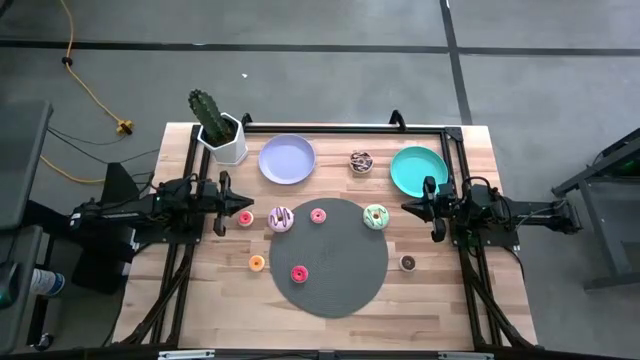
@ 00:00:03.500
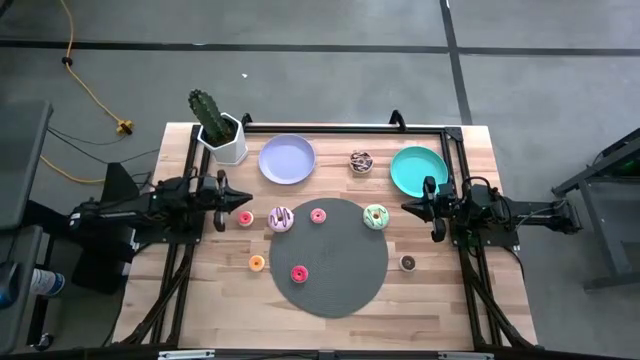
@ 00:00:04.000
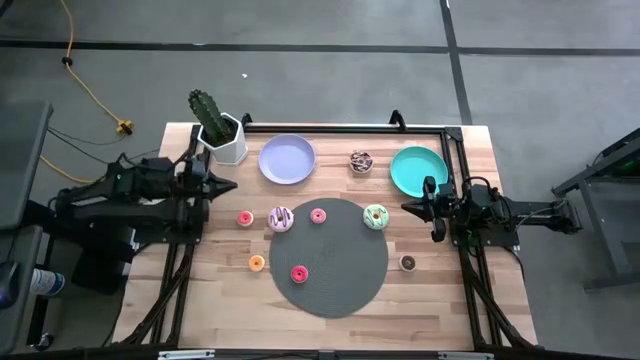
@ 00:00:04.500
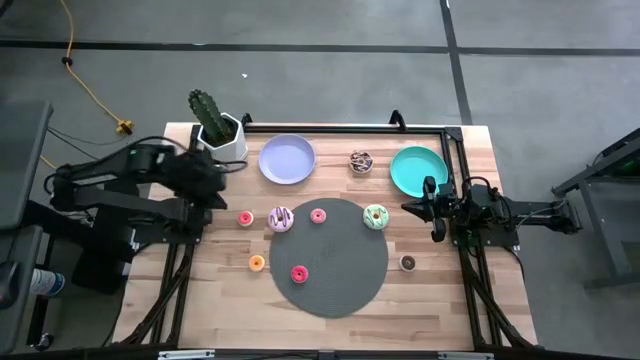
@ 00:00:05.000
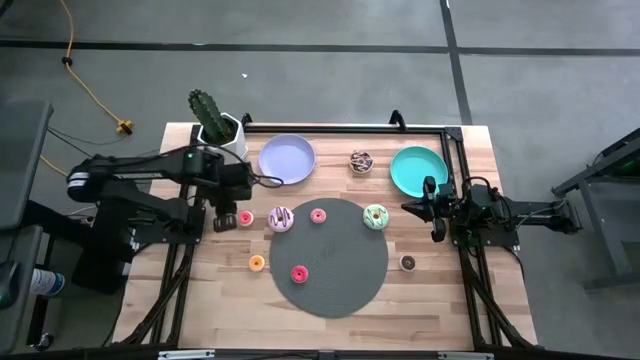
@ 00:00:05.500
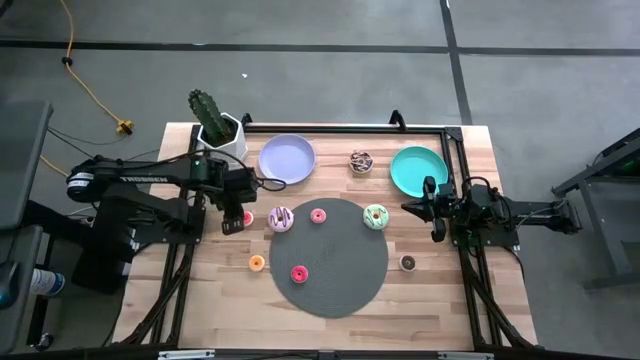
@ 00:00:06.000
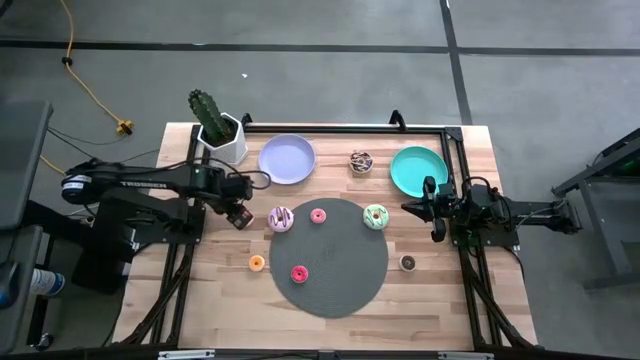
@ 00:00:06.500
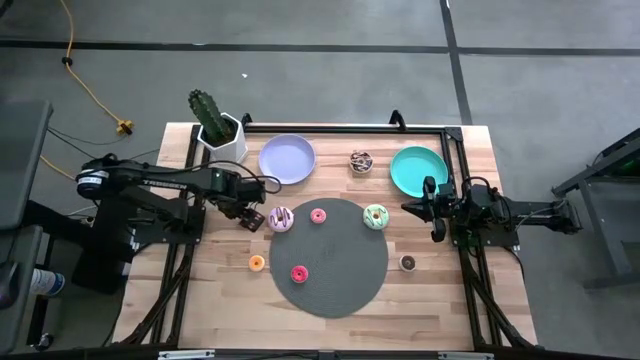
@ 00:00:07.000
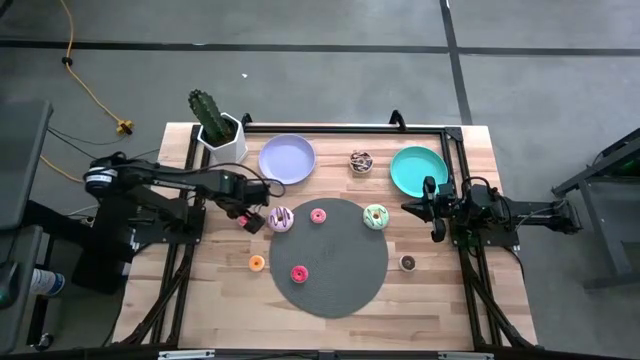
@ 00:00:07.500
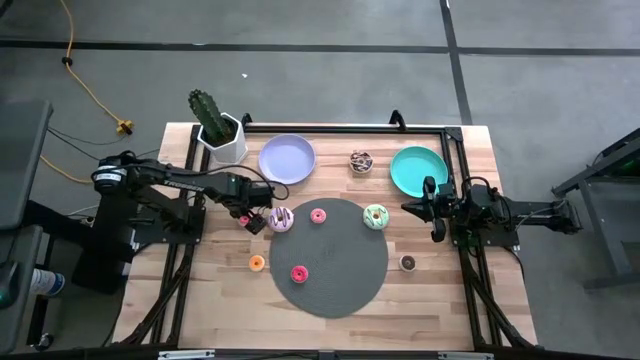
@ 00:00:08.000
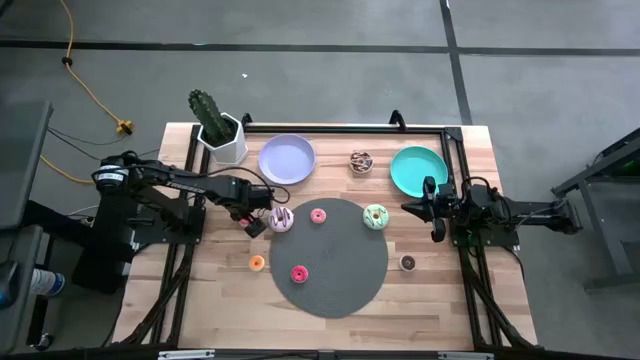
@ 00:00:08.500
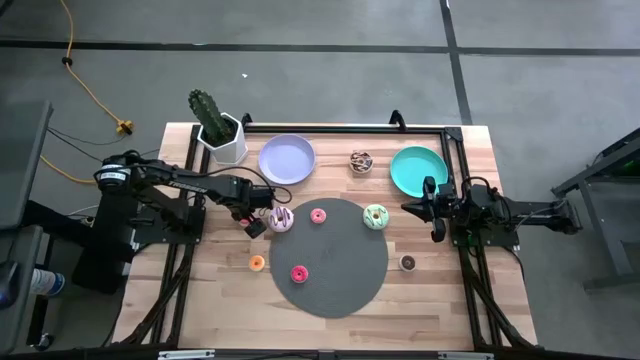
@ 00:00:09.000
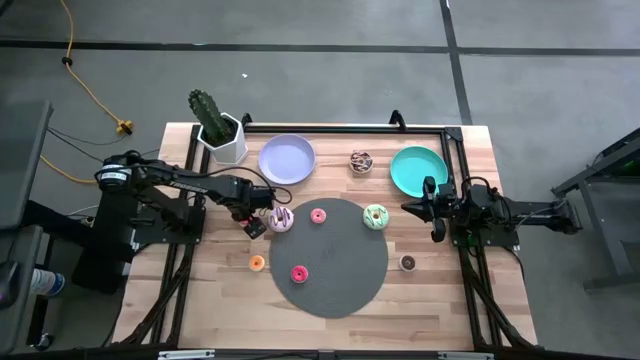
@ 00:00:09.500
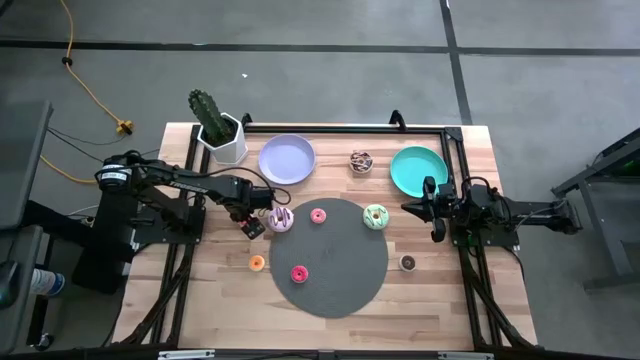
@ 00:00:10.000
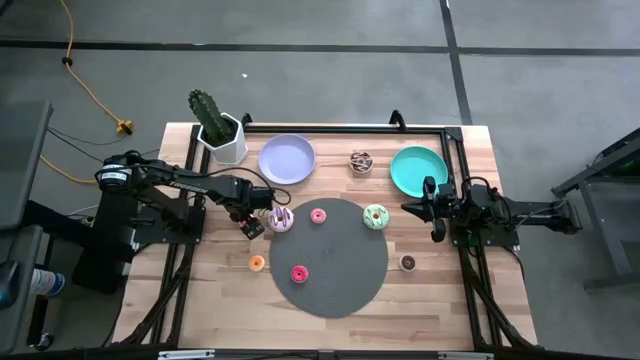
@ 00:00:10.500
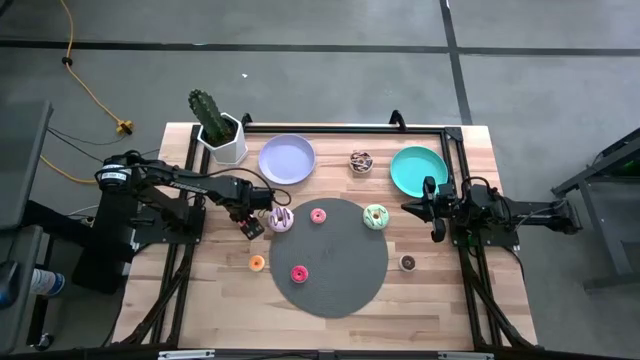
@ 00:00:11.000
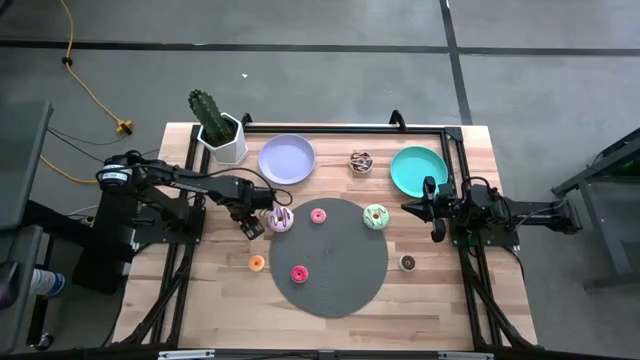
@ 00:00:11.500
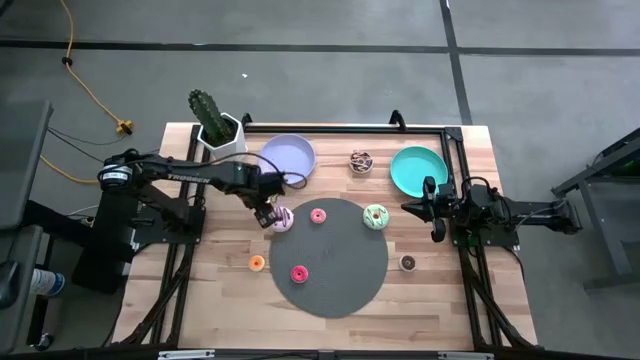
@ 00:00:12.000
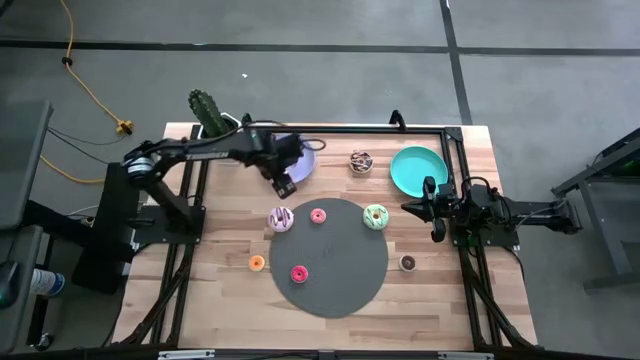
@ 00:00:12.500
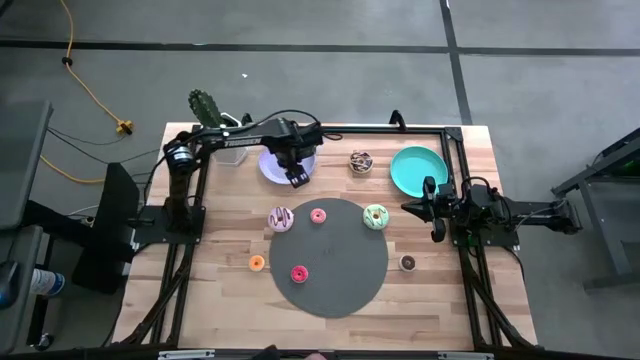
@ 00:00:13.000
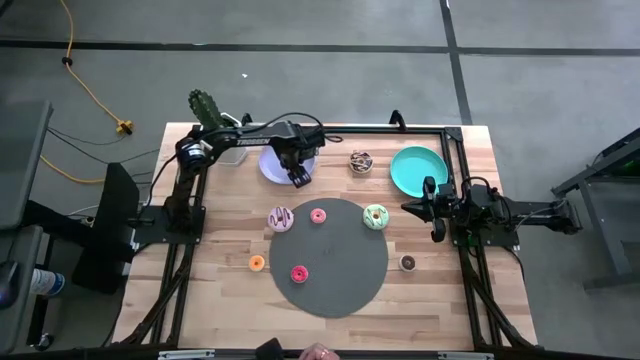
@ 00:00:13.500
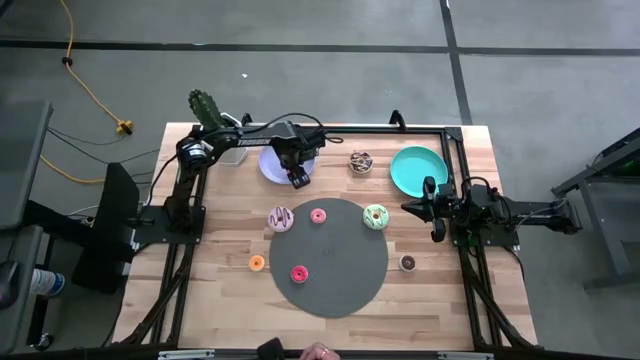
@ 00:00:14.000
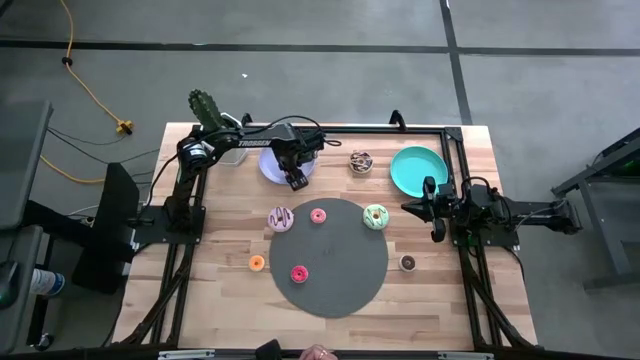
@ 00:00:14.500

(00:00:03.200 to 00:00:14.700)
Task: Pick & Place donuts
Put the small orange doughnut on the purple plate

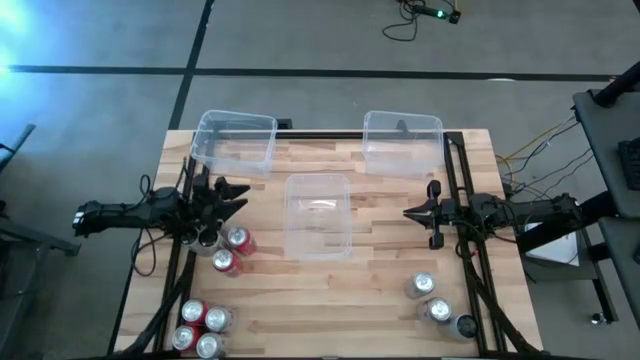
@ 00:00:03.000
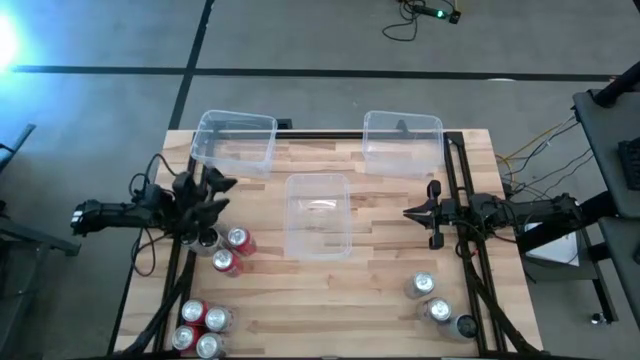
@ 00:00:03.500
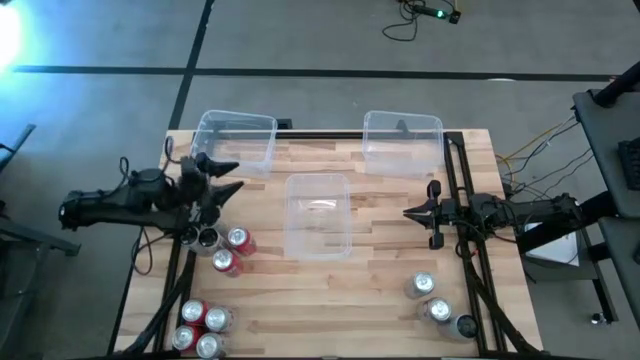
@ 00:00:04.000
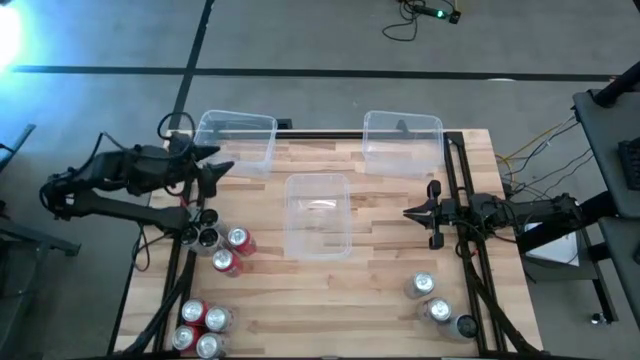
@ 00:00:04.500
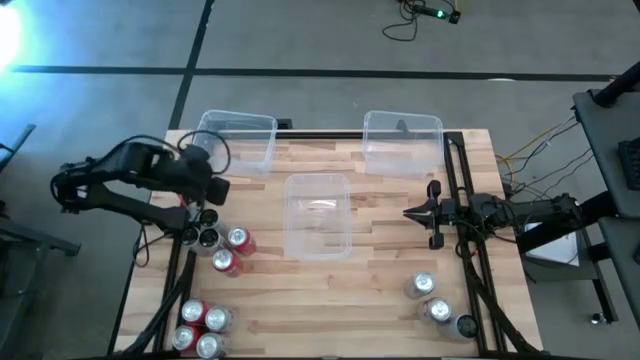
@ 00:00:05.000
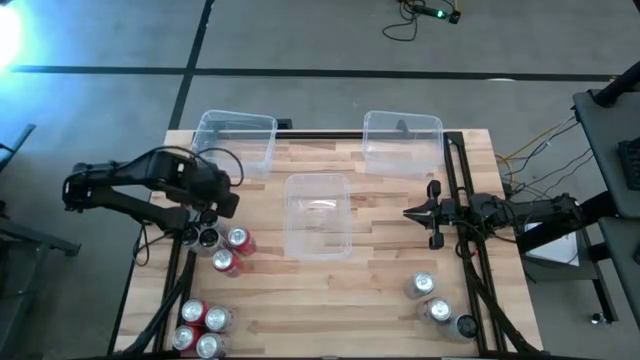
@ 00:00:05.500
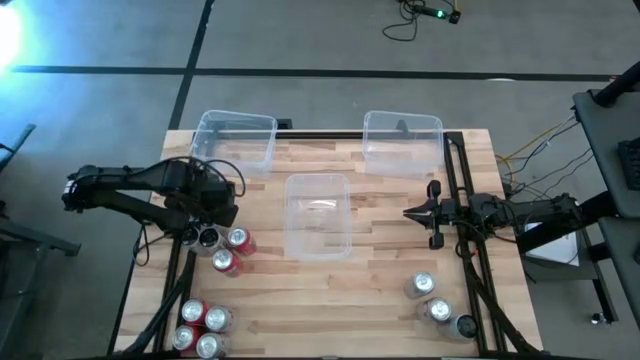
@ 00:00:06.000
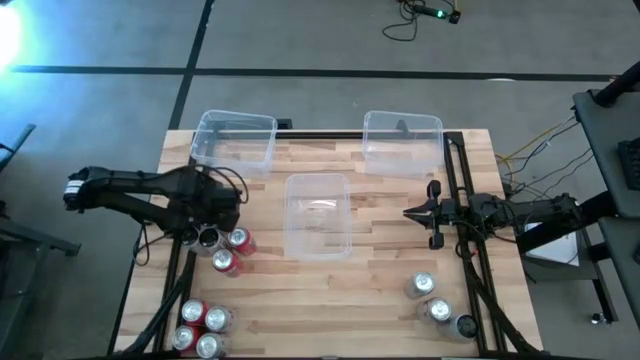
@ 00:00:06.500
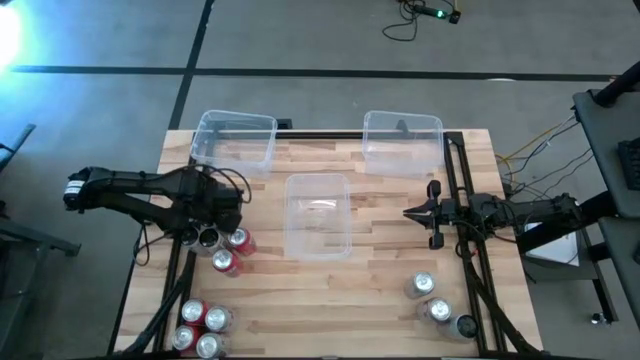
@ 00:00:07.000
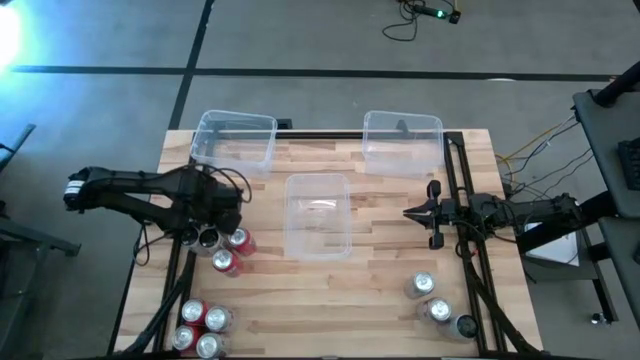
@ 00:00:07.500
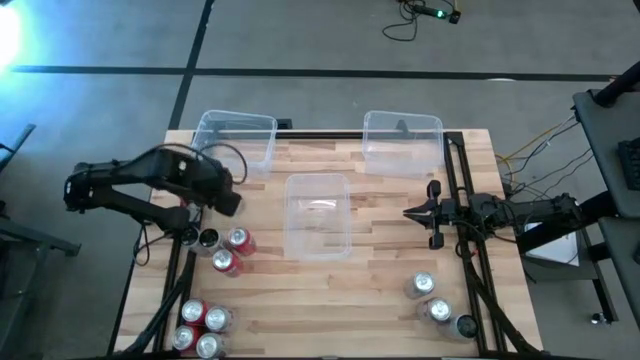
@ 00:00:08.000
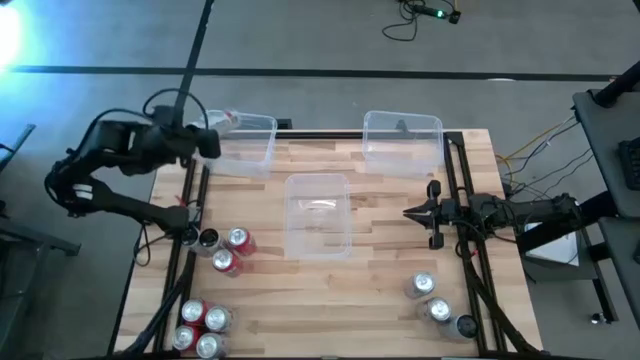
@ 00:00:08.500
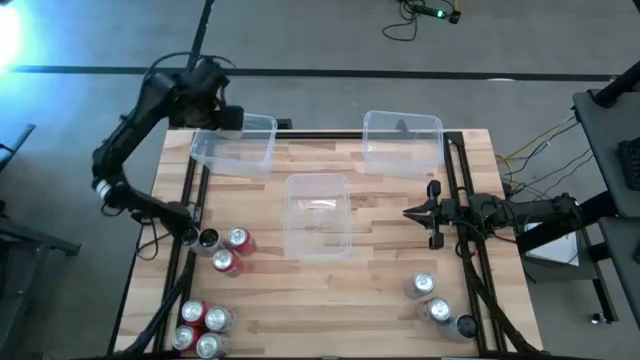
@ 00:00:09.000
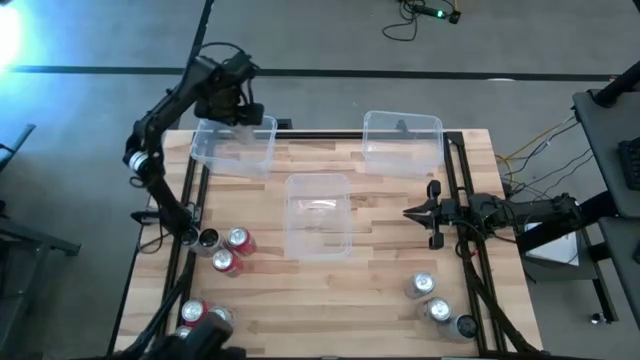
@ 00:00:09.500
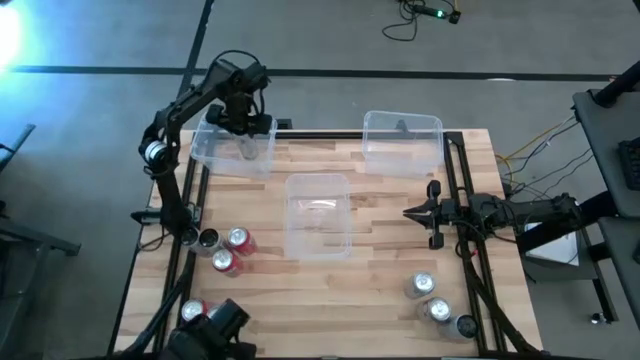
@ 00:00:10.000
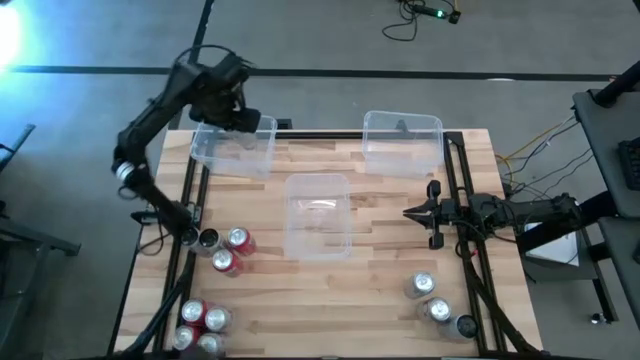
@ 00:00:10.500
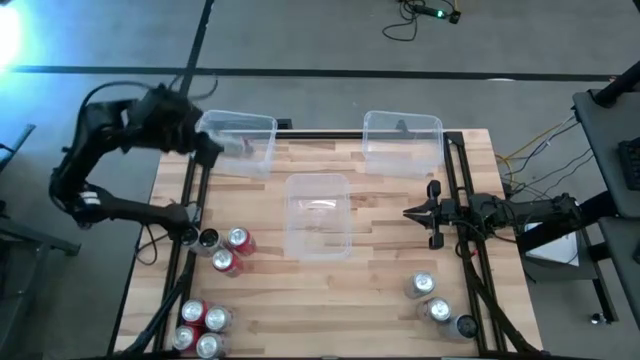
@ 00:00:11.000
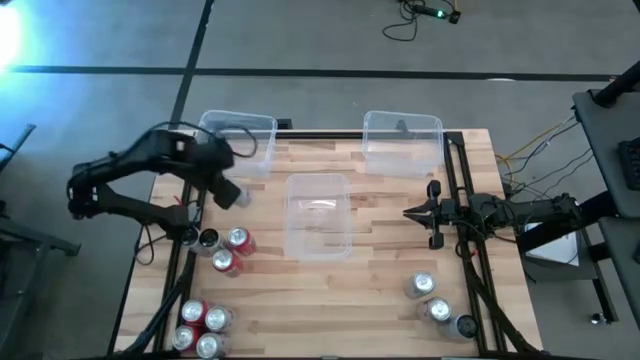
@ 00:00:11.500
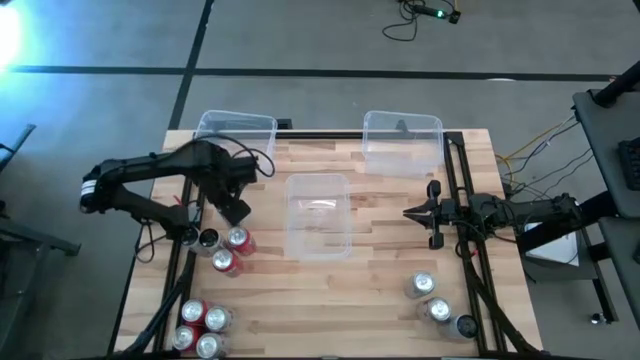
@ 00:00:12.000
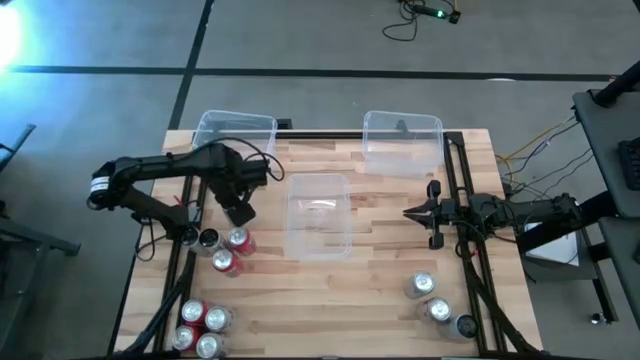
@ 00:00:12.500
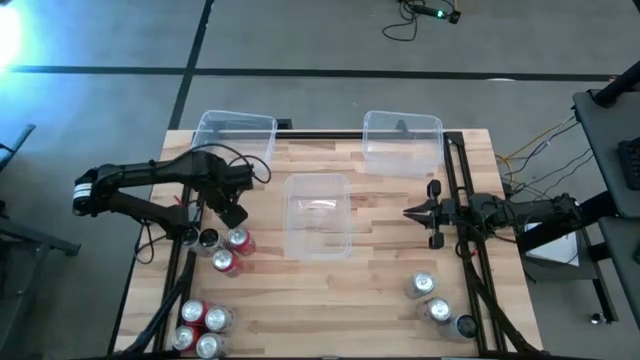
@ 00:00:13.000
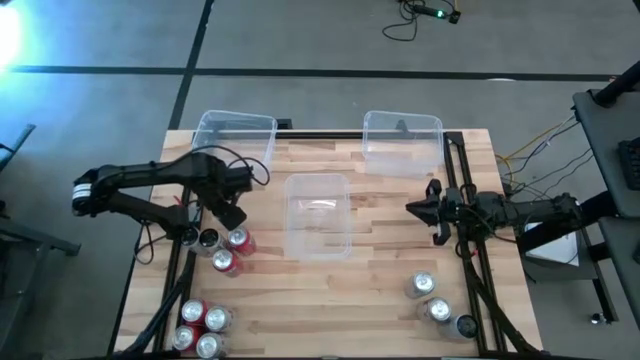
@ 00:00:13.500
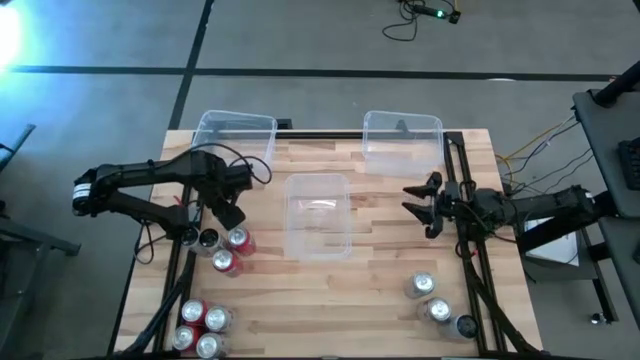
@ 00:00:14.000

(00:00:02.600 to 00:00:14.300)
Task: Sort soda cans
Put the white-pink soda can into the left transparent bin
